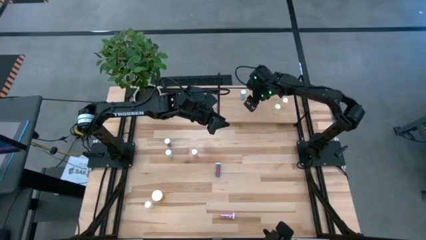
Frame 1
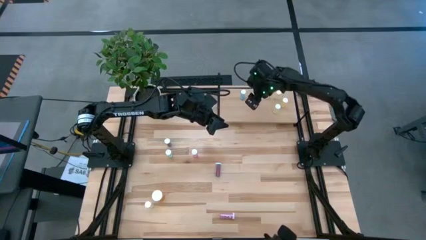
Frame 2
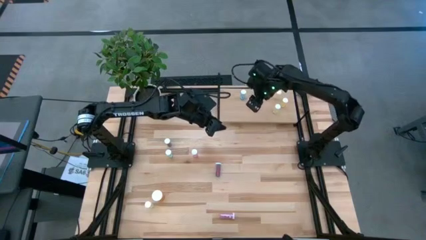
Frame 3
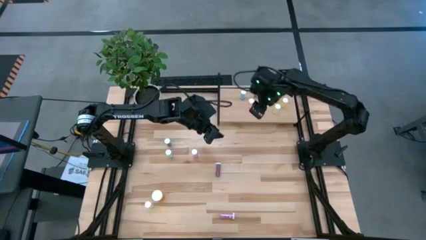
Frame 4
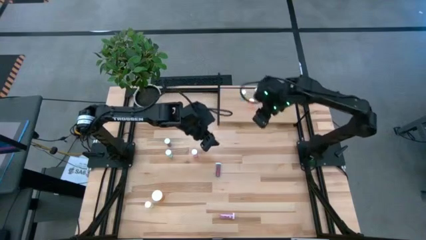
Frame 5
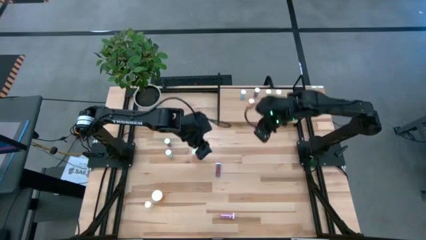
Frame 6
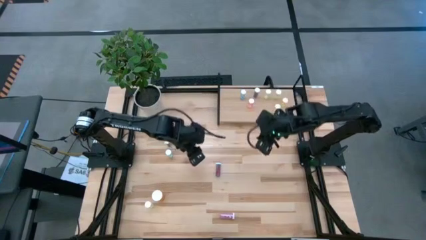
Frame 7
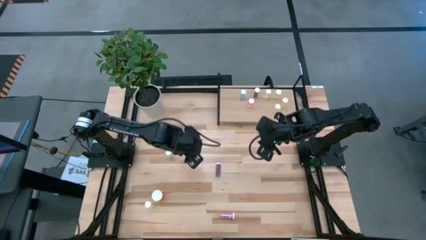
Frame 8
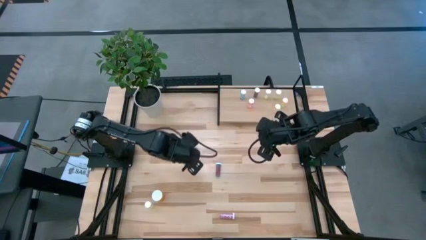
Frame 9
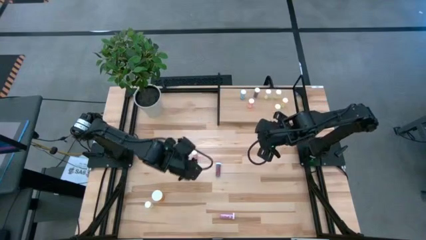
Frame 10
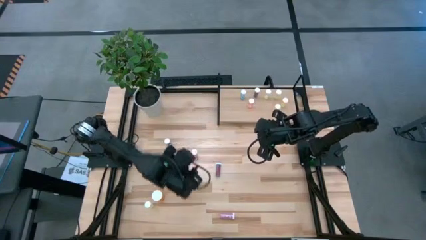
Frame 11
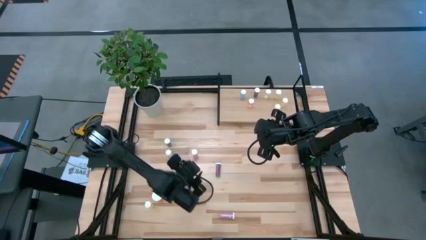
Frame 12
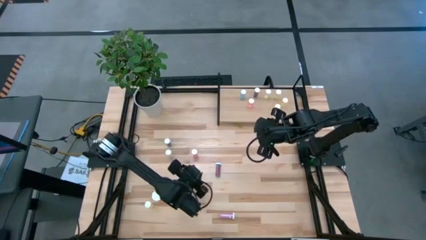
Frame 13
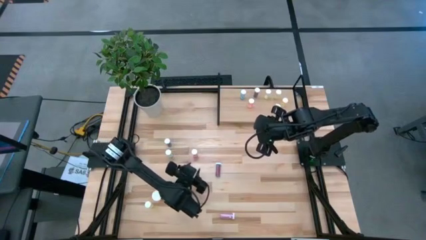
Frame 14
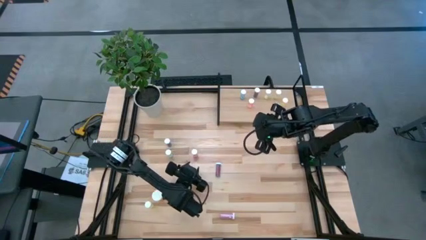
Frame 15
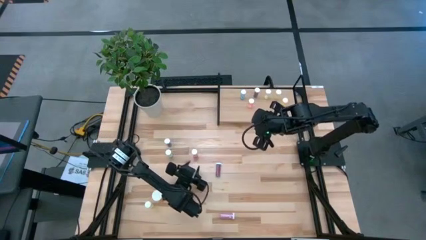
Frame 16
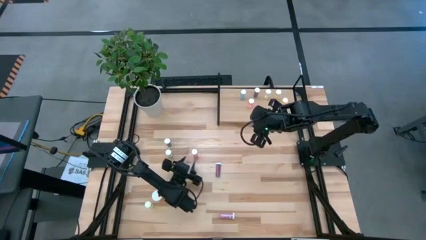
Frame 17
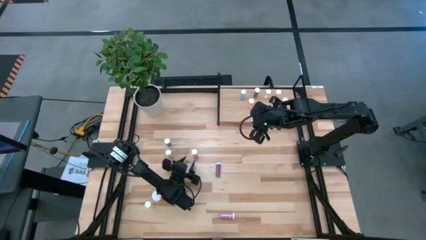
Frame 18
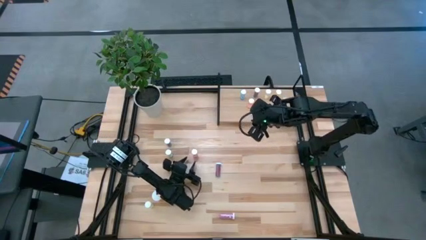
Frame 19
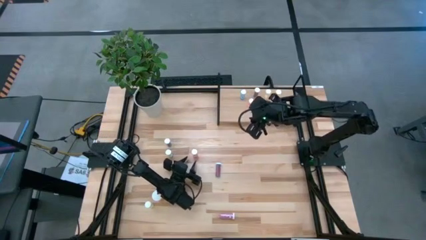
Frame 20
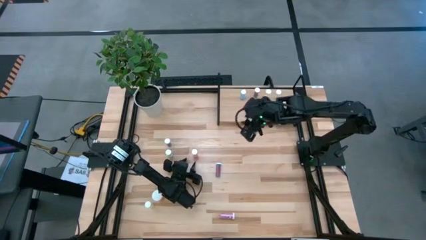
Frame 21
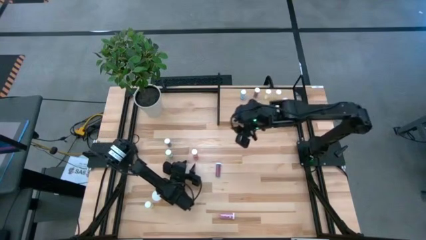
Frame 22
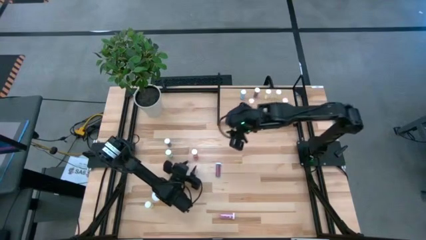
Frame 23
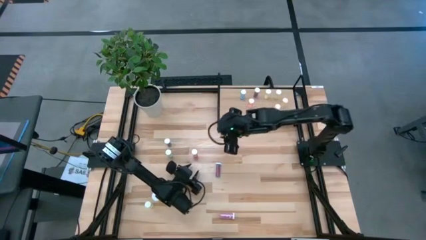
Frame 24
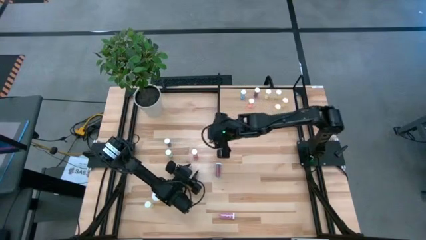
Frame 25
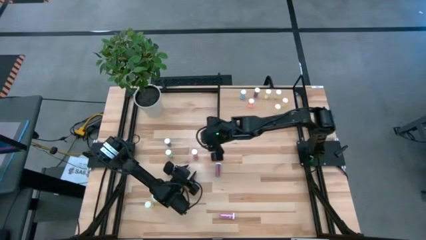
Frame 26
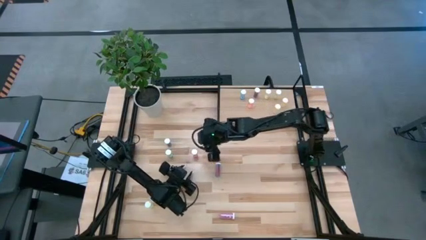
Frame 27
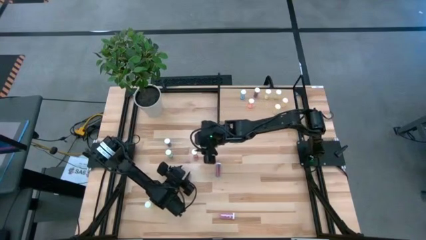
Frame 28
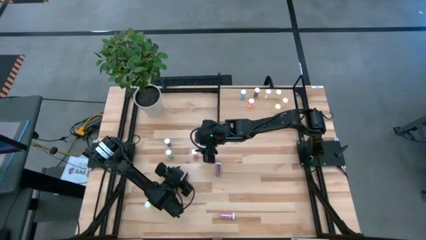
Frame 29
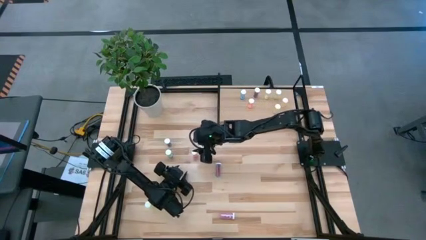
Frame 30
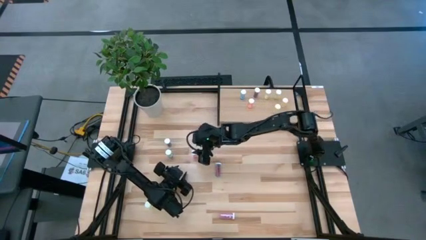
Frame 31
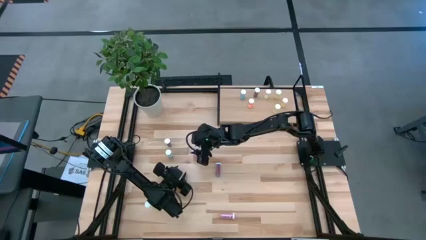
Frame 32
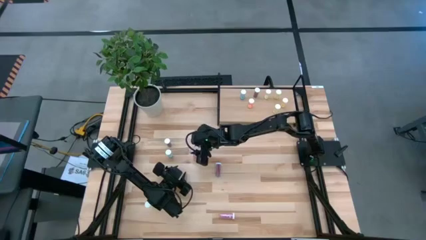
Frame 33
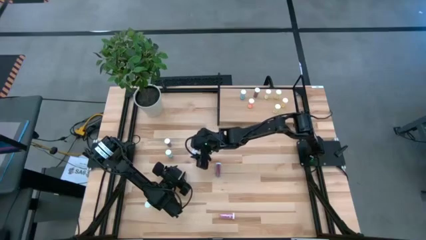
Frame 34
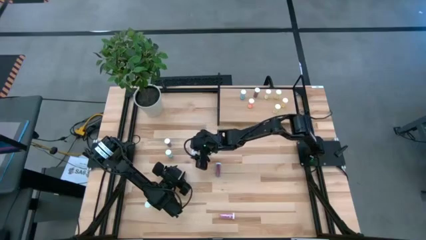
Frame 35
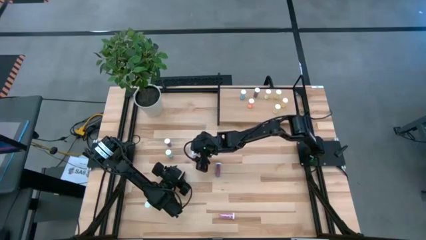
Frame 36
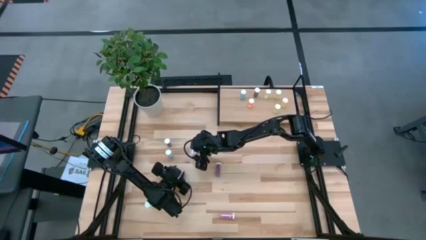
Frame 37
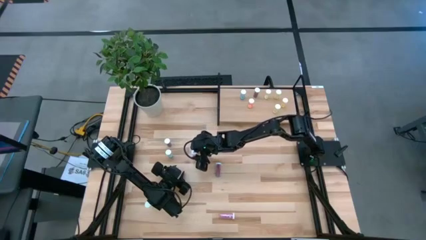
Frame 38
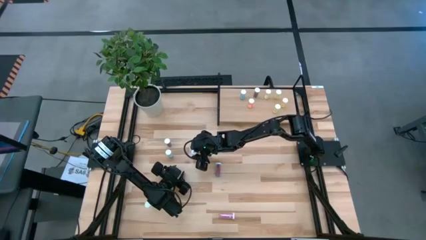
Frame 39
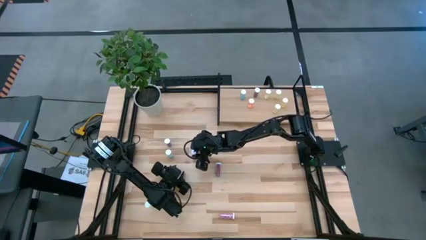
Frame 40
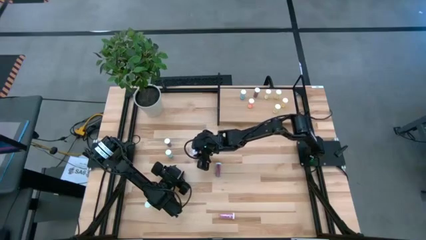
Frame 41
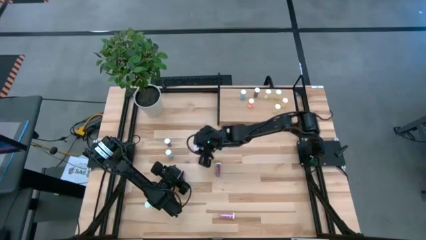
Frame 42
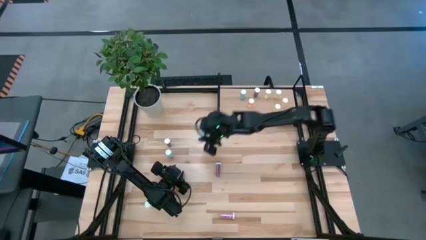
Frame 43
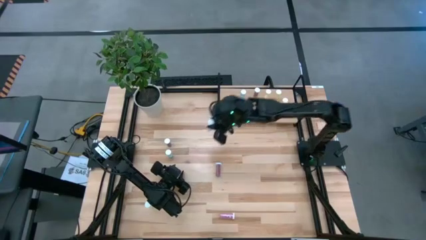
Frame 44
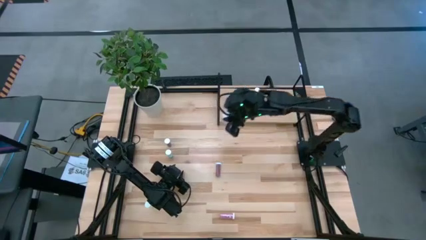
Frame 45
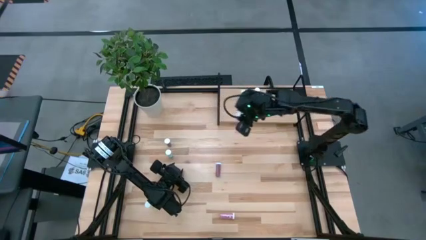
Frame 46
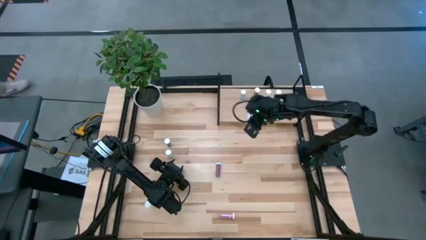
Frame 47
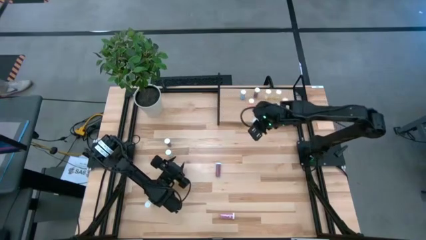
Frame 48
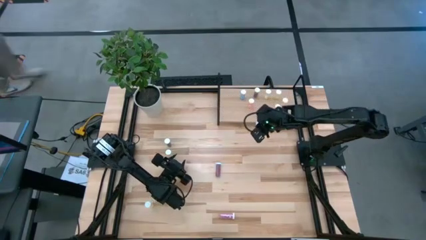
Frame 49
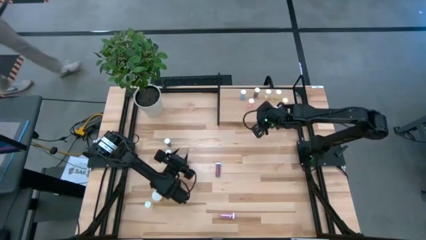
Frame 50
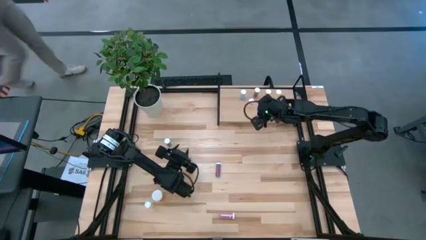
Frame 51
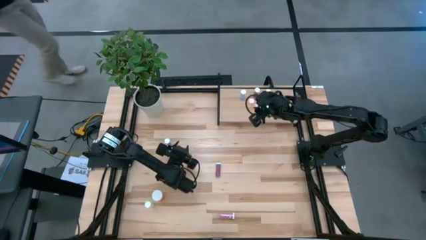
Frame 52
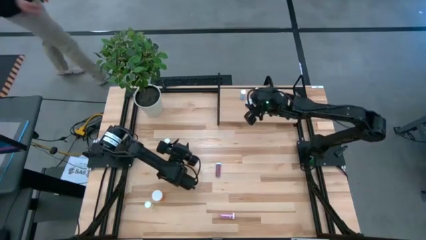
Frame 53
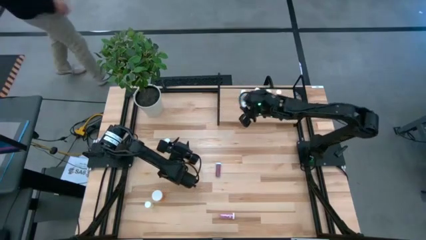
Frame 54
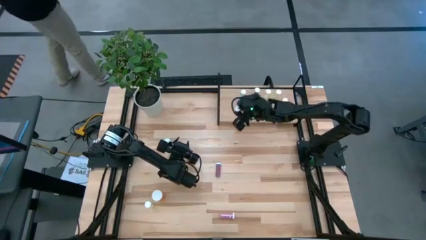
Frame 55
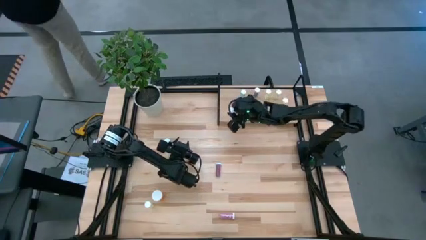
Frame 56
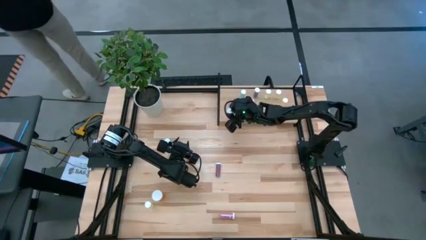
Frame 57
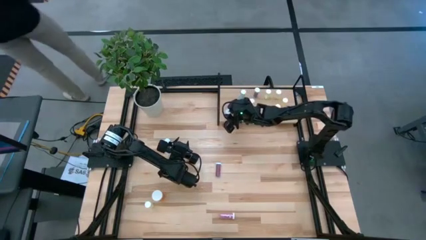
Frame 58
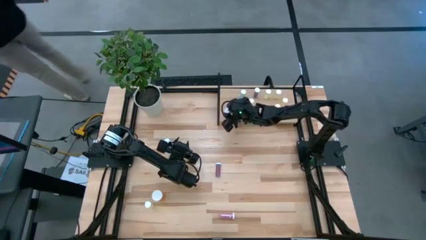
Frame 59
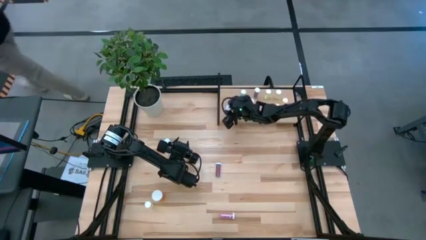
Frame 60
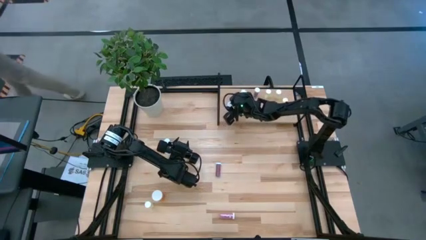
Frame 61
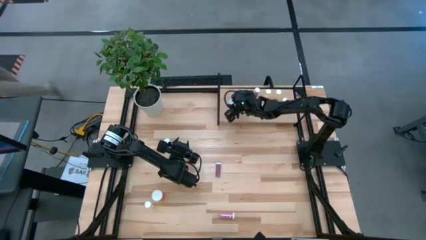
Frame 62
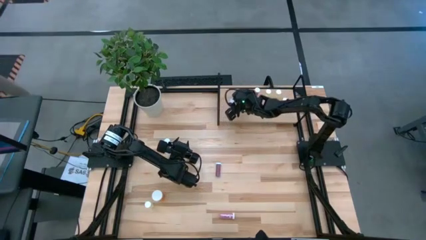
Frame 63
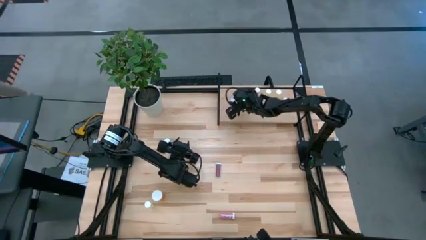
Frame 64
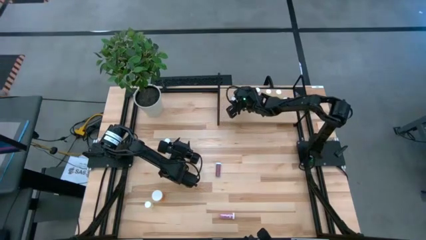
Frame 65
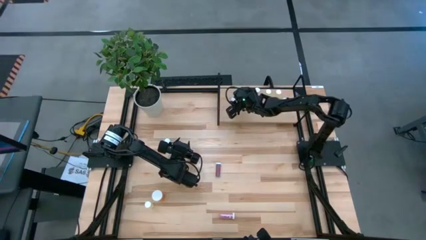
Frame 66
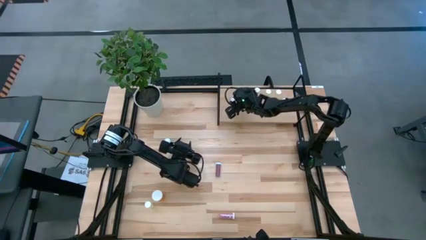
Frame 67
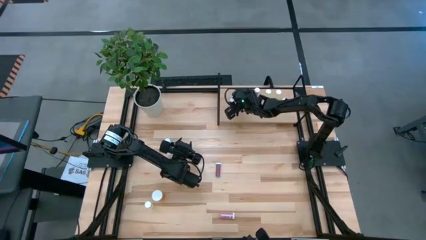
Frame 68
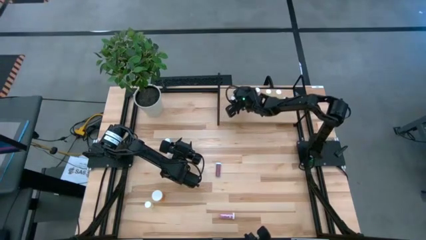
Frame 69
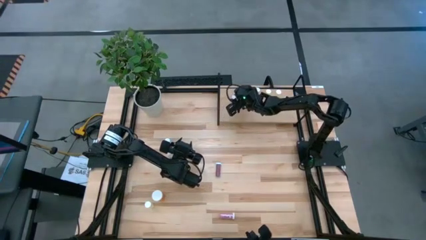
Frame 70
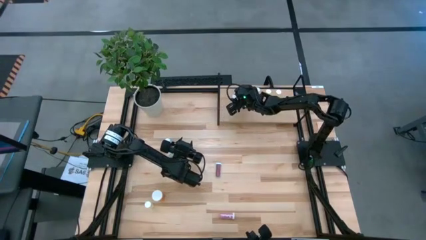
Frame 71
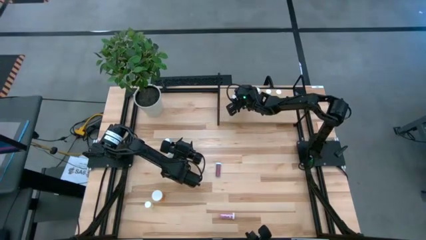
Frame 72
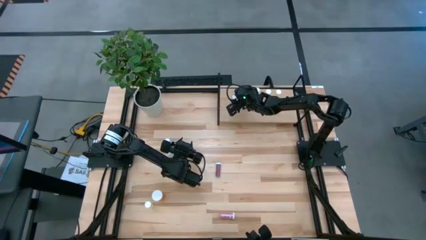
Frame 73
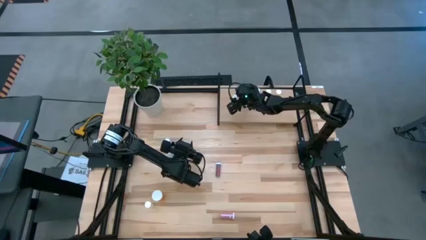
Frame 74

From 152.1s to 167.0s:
Task: Pick and place medicine bottles onto shelf by color
Put the pink pill bottle on the shelf
